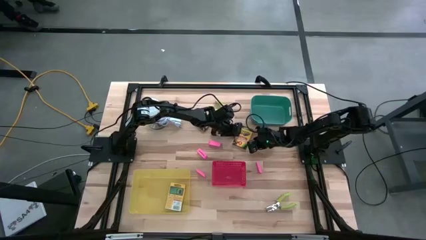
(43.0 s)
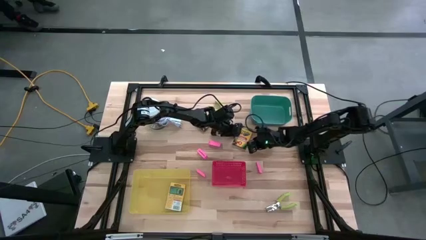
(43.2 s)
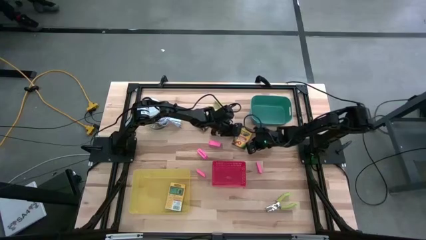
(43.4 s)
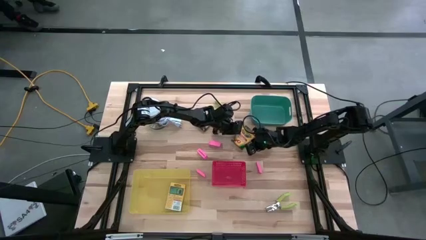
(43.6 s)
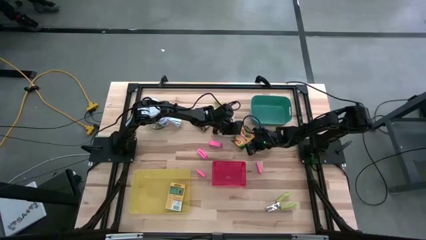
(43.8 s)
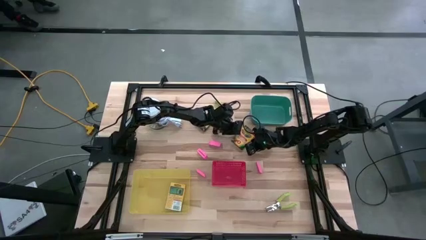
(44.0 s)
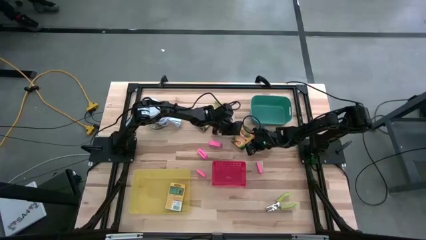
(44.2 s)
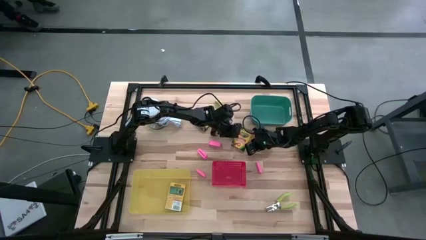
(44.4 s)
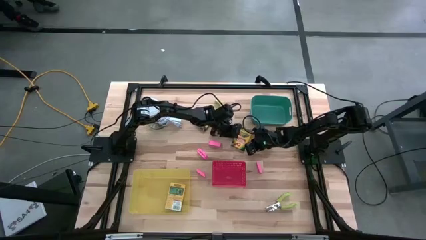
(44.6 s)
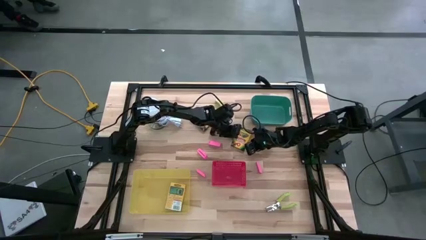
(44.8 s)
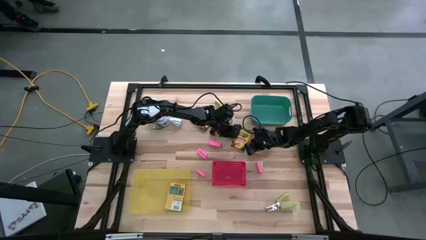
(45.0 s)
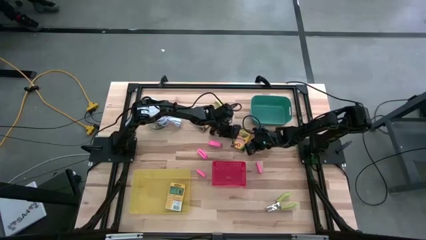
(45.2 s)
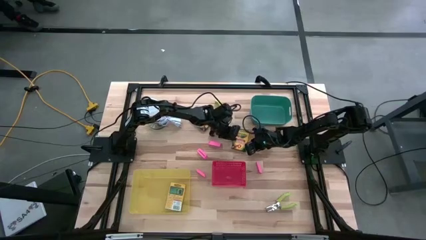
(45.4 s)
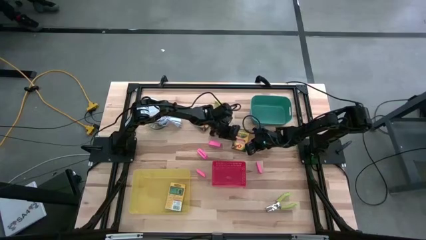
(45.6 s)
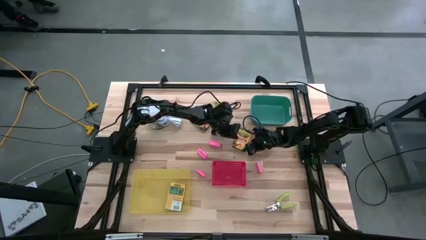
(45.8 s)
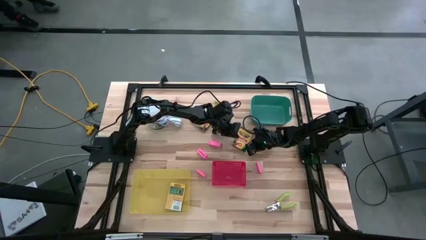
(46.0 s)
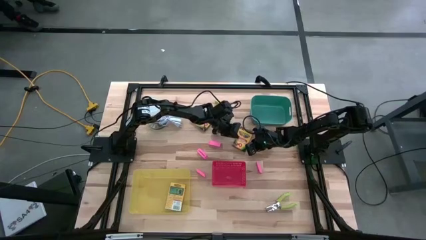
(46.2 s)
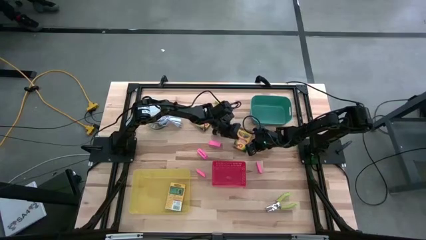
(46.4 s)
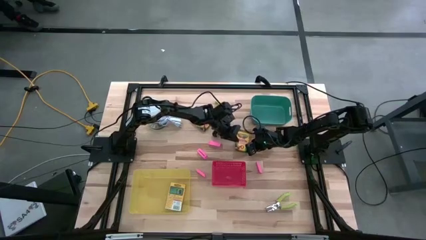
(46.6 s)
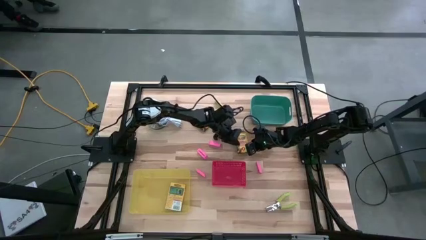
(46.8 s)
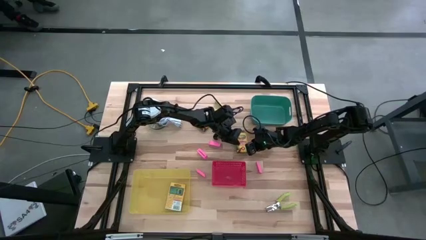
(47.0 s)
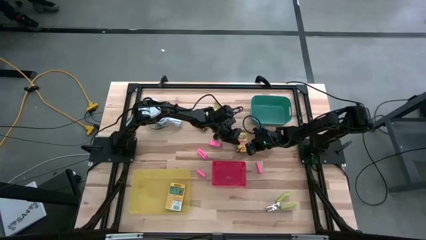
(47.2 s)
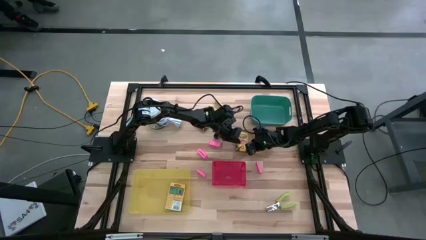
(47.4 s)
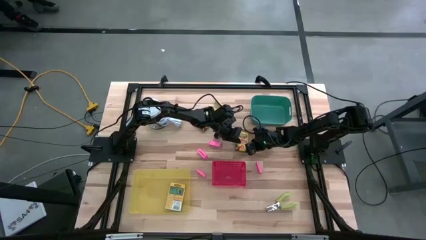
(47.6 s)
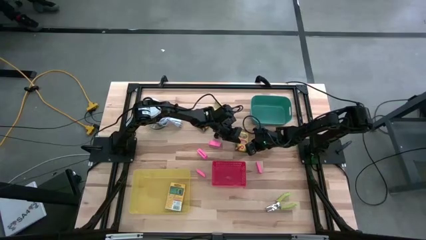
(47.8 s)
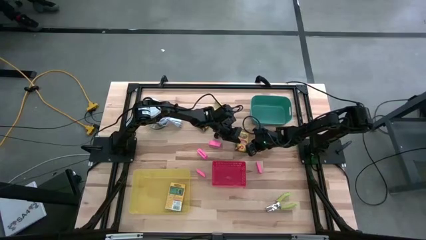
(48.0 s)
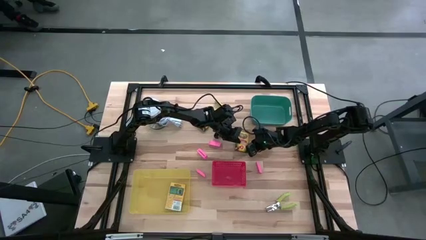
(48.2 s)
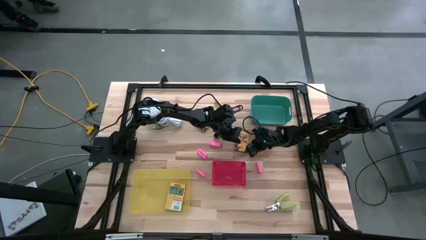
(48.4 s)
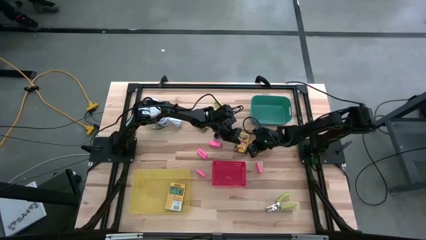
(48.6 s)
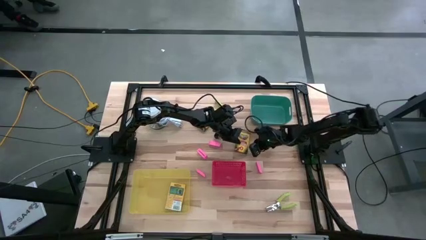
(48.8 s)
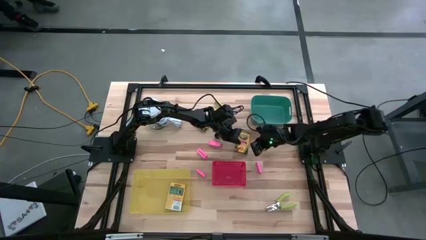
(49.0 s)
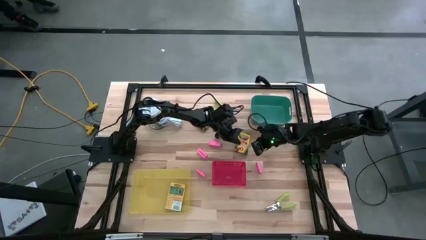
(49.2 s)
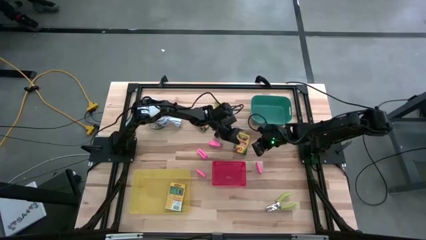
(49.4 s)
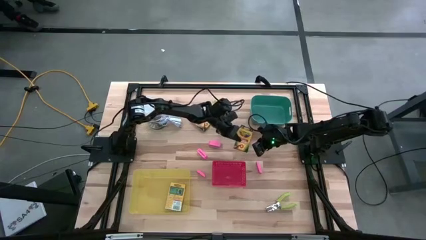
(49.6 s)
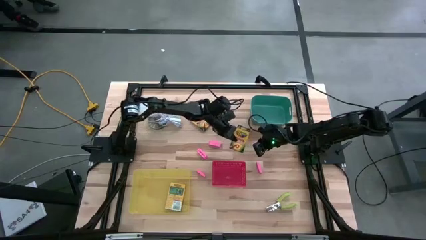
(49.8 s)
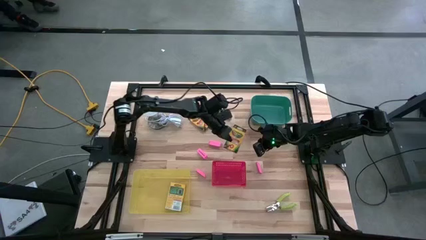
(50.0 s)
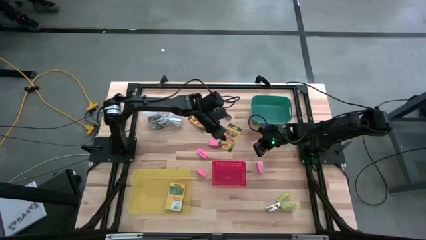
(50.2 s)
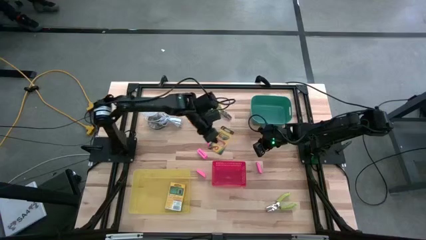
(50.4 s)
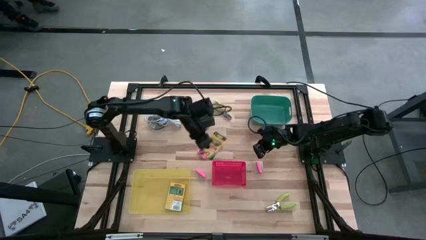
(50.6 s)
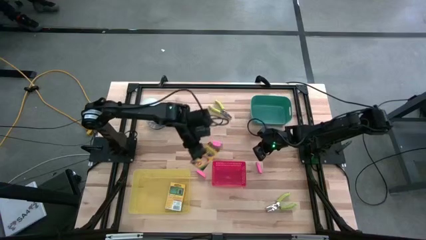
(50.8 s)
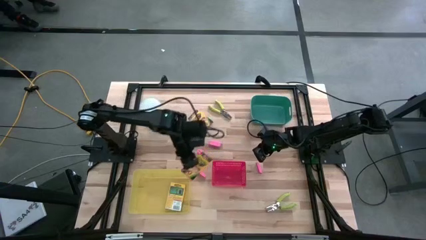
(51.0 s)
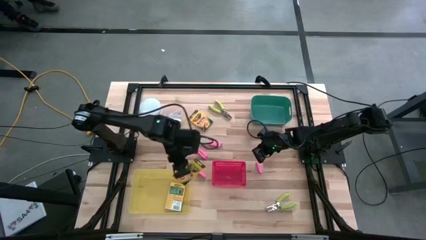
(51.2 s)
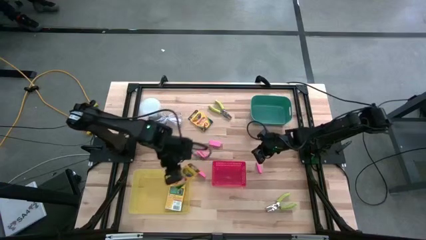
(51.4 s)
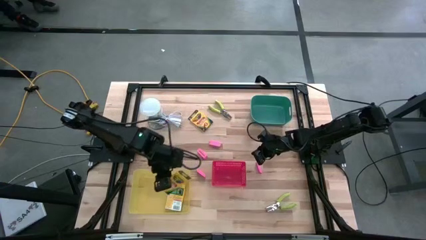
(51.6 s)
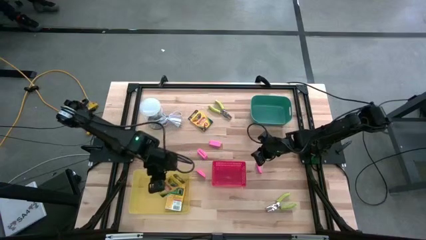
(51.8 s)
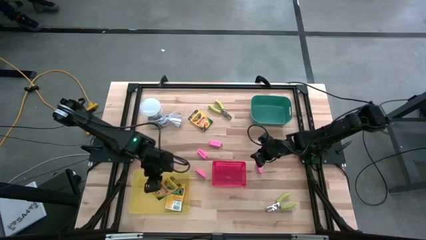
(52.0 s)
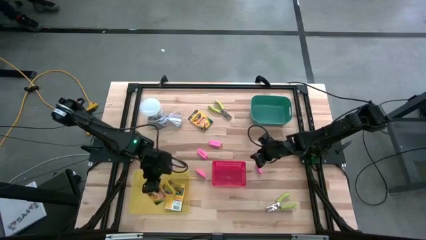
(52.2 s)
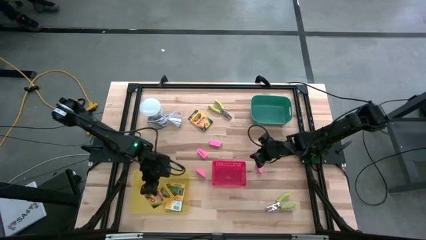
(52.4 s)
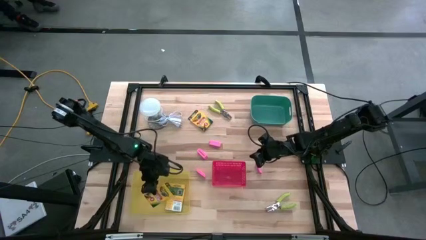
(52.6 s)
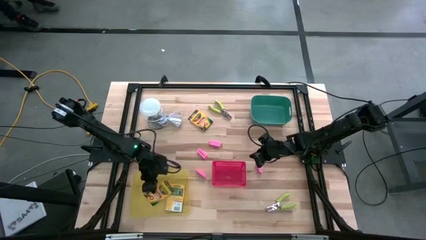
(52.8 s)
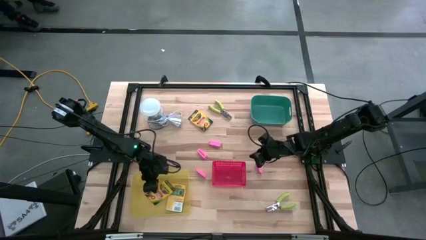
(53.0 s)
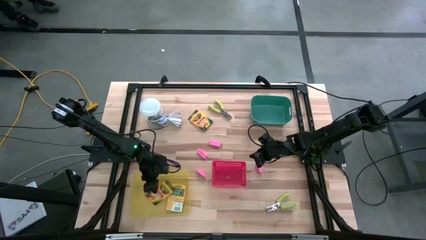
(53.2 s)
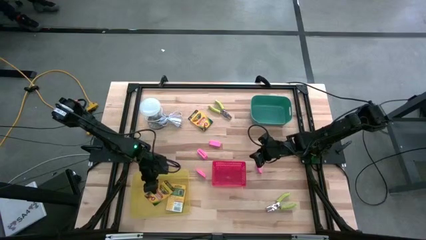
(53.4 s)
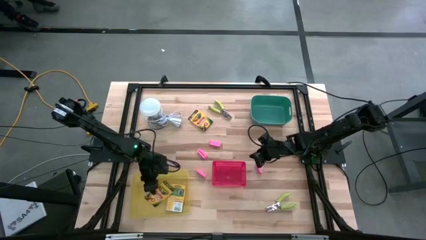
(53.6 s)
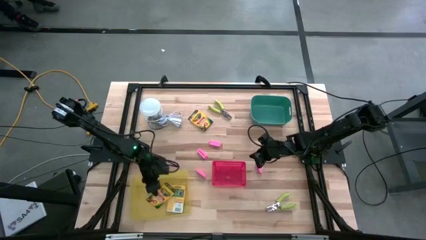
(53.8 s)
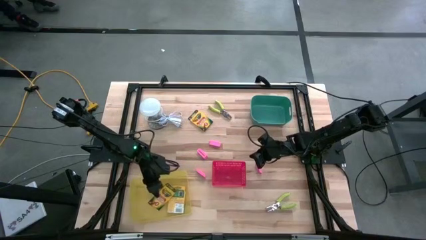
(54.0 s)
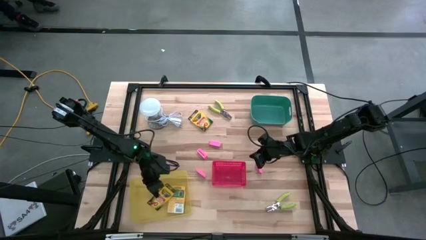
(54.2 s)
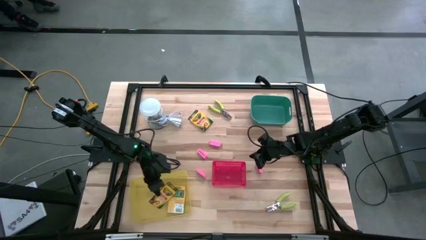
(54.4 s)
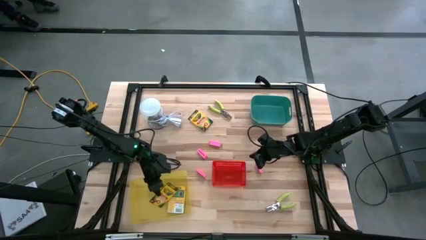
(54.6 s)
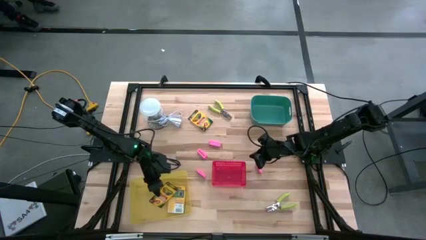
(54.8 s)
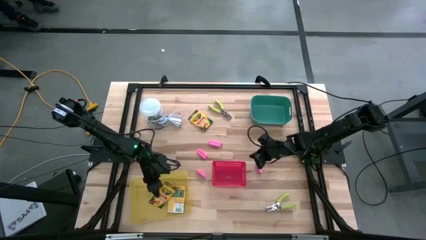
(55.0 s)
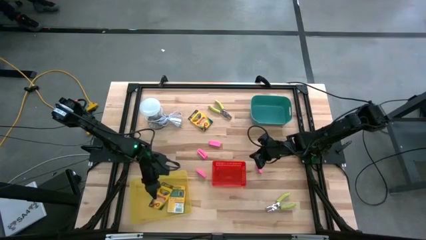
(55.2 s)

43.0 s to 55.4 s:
Task: Pick & Place School Supplies
Put the right yellow crayon box into the yellow bin

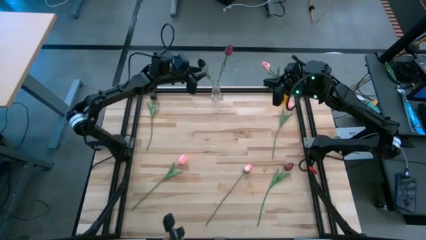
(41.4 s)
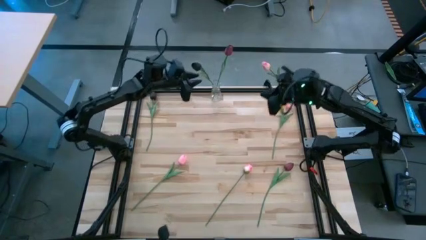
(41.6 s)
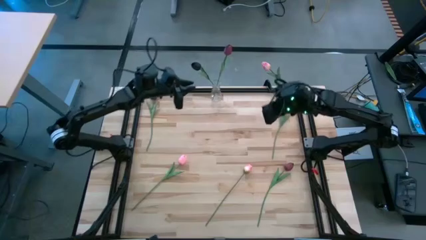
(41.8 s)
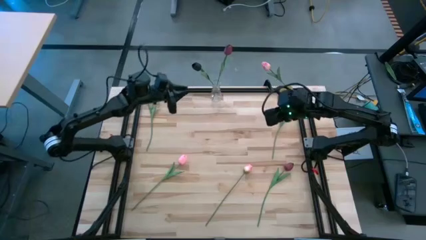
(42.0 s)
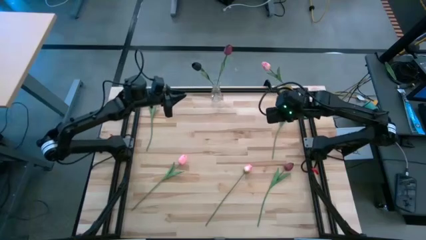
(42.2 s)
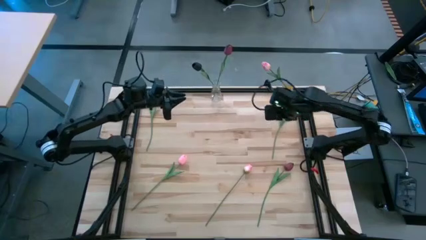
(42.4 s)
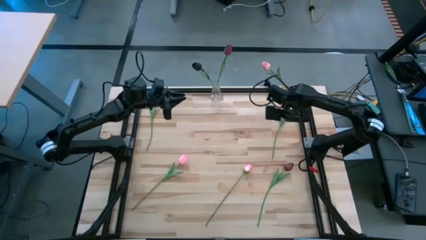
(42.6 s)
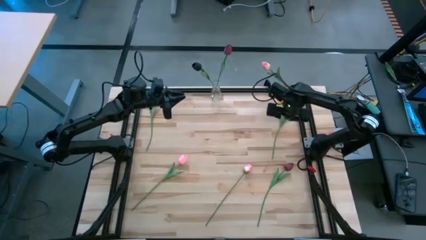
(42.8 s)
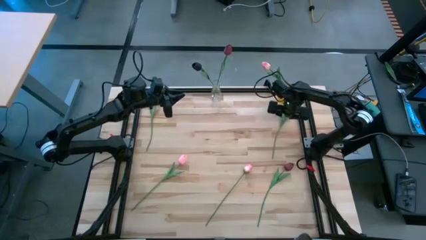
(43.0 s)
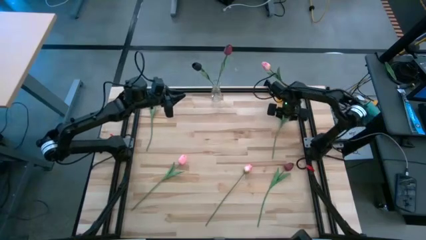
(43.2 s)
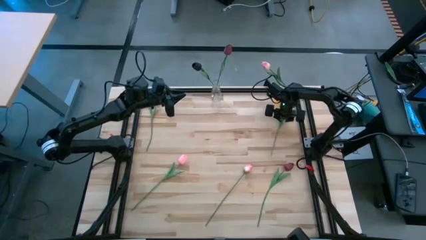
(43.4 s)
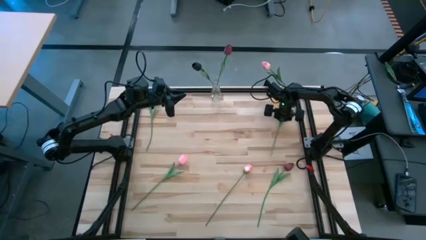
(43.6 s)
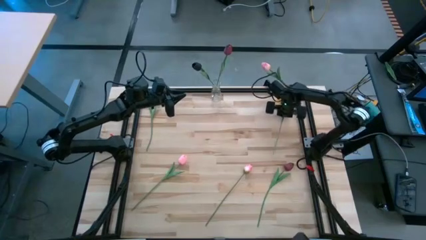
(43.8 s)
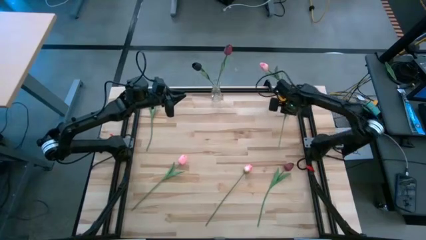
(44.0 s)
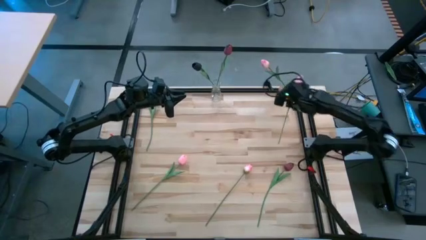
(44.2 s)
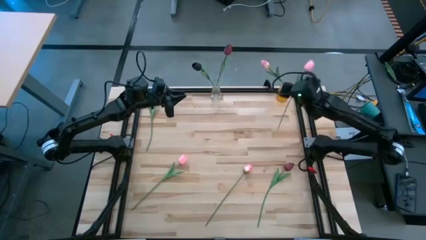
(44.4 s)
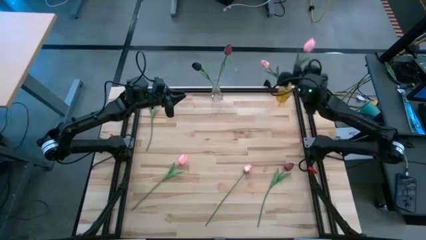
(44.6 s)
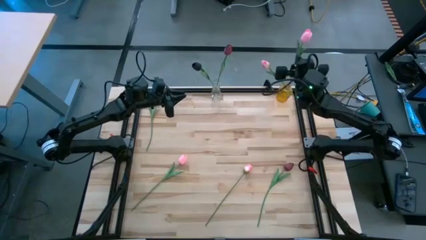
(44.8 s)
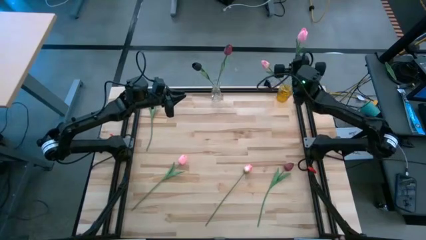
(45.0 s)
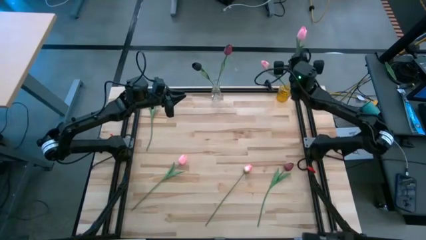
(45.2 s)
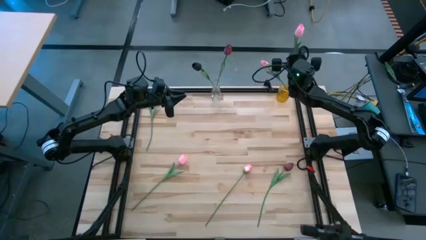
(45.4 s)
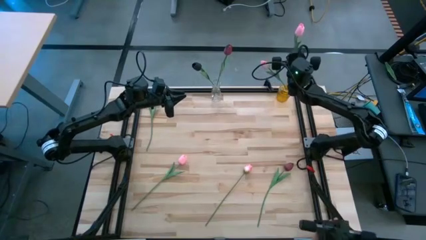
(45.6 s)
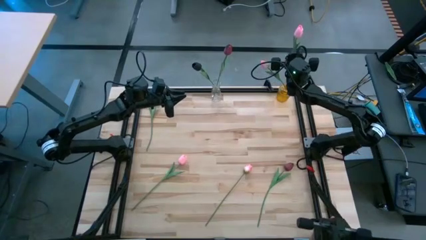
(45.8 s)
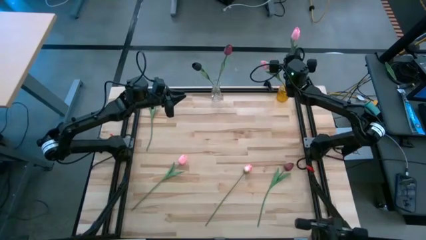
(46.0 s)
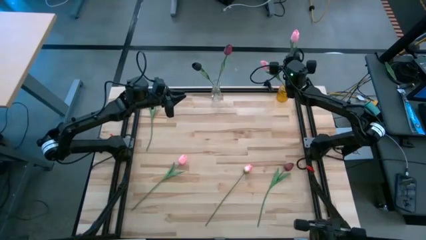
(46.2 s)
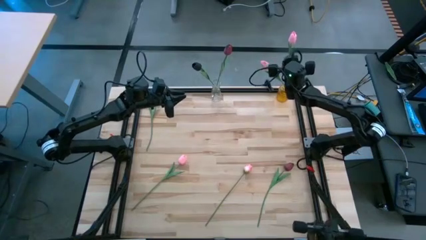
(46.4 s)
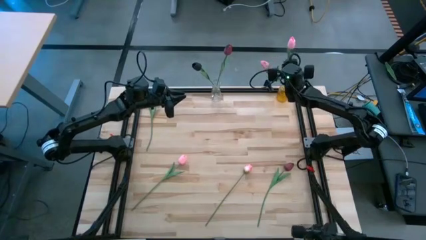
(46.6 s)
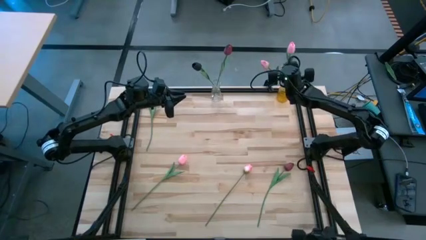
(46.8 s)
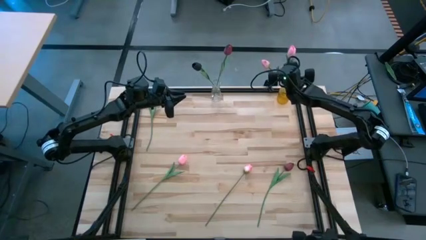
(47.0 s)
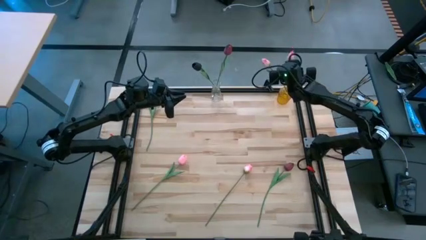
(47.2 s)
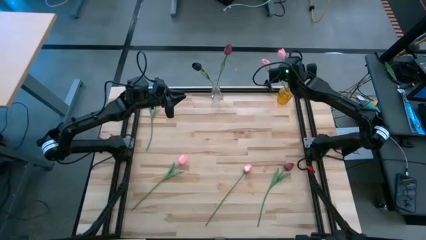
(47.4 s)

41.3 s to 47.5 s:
Task: Sort flowers into vase by color
Put the top right pink tulip into the yellow crystal vase
